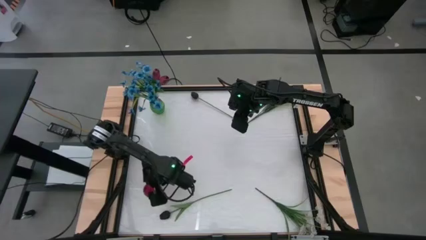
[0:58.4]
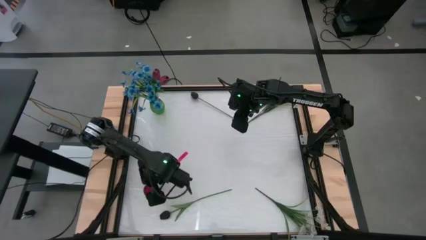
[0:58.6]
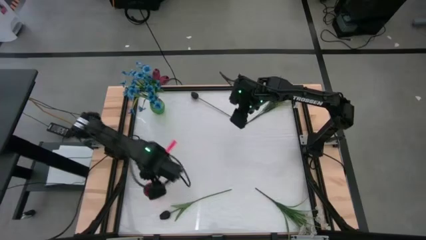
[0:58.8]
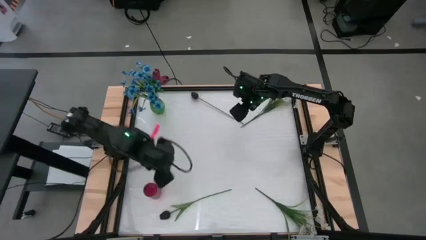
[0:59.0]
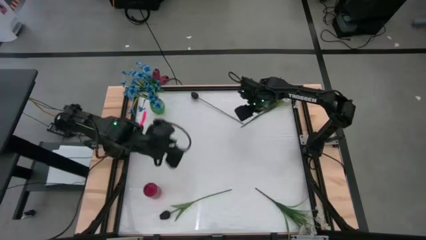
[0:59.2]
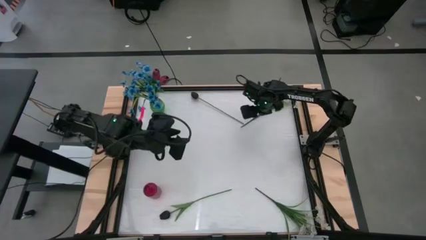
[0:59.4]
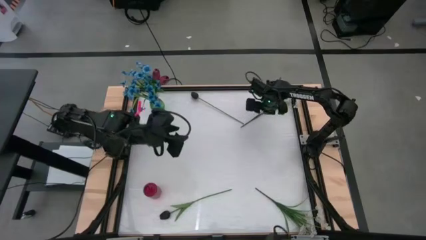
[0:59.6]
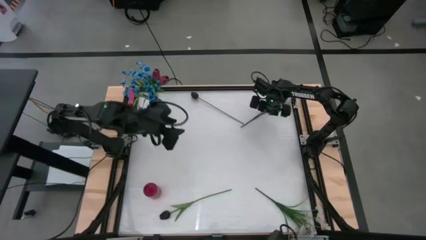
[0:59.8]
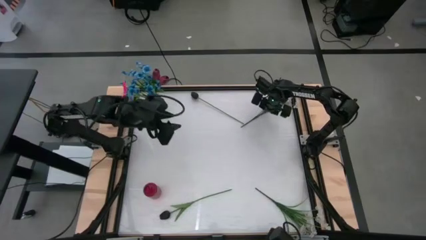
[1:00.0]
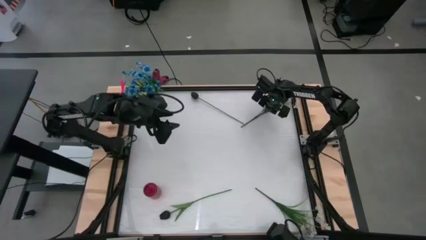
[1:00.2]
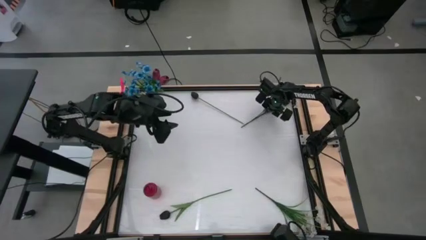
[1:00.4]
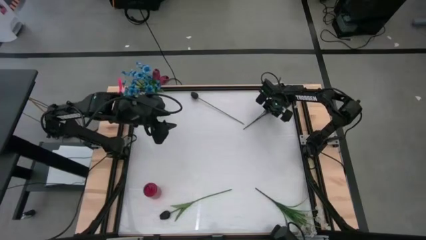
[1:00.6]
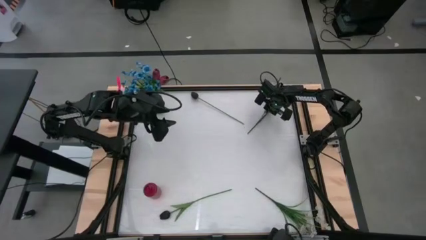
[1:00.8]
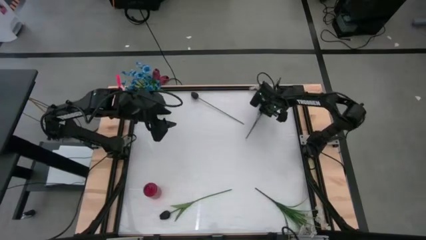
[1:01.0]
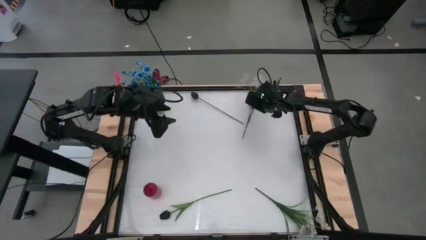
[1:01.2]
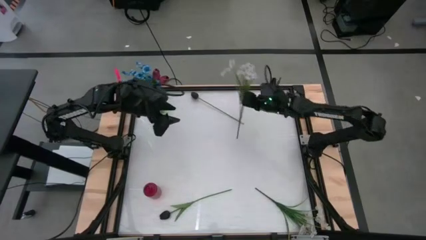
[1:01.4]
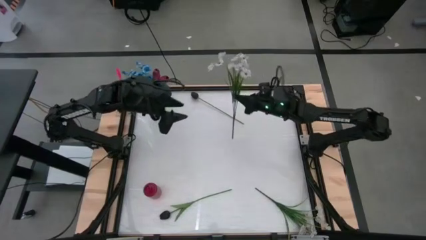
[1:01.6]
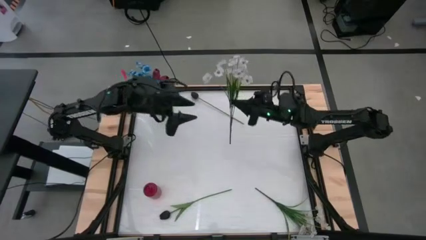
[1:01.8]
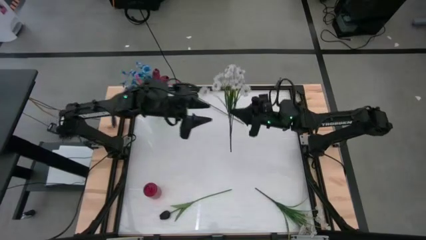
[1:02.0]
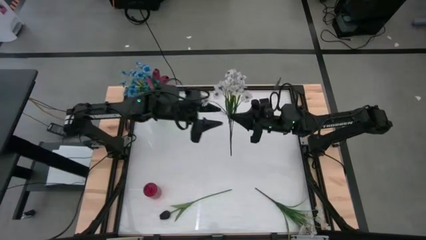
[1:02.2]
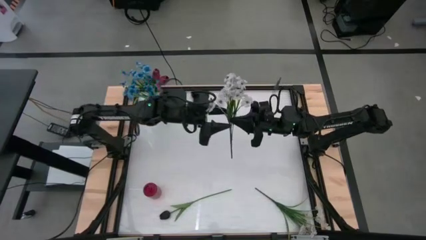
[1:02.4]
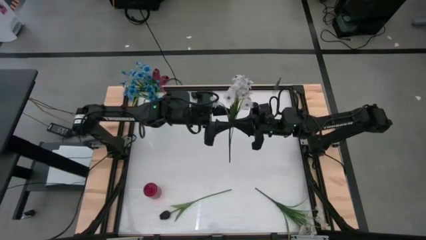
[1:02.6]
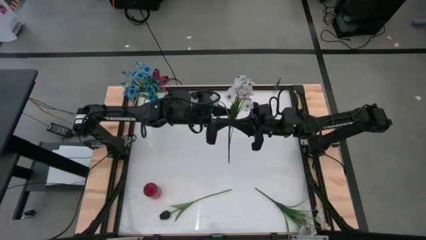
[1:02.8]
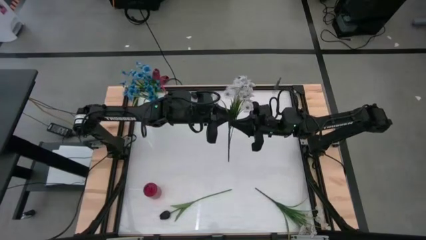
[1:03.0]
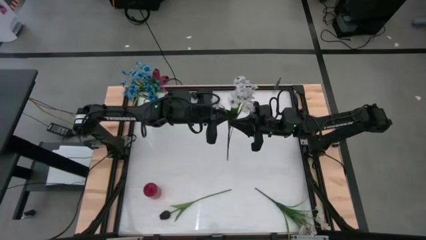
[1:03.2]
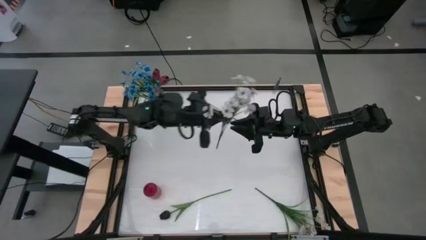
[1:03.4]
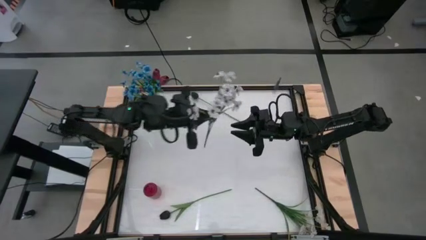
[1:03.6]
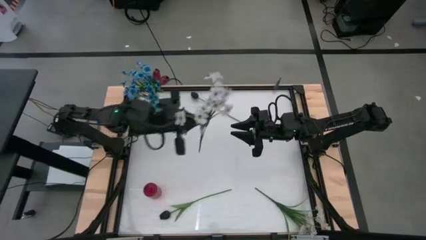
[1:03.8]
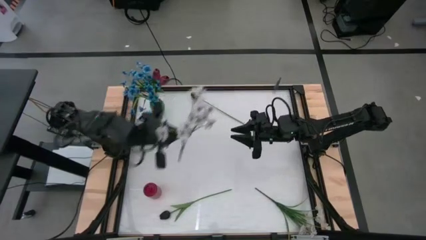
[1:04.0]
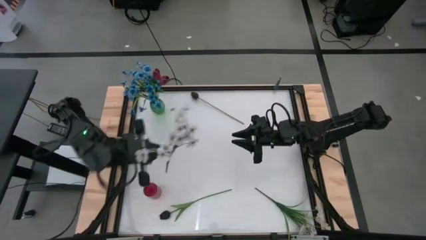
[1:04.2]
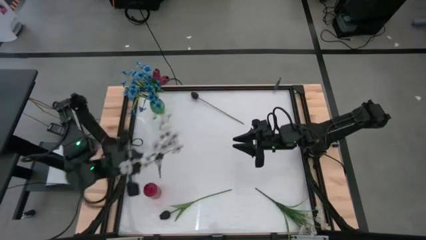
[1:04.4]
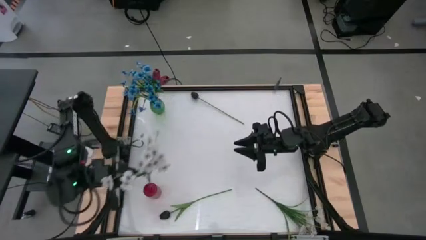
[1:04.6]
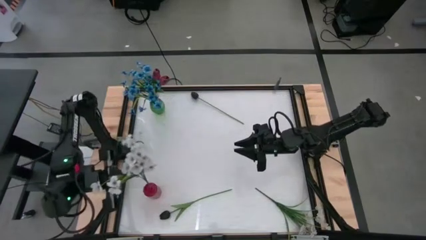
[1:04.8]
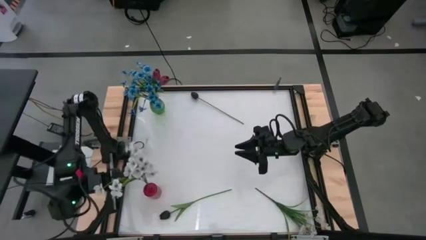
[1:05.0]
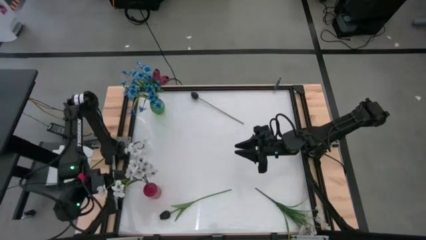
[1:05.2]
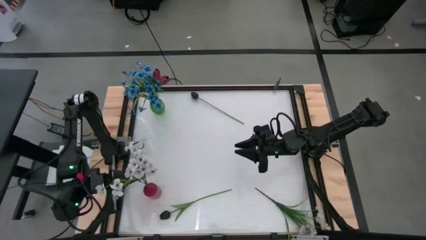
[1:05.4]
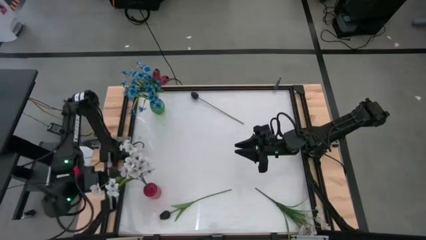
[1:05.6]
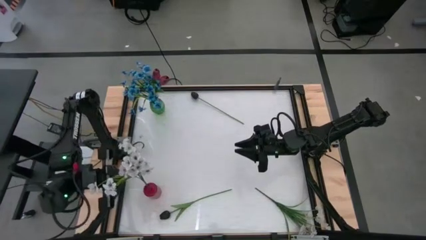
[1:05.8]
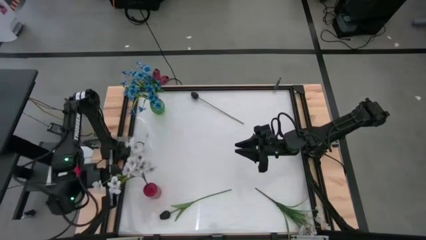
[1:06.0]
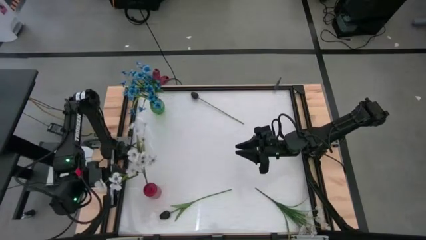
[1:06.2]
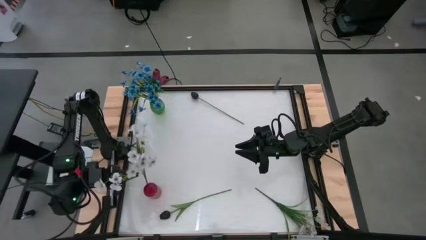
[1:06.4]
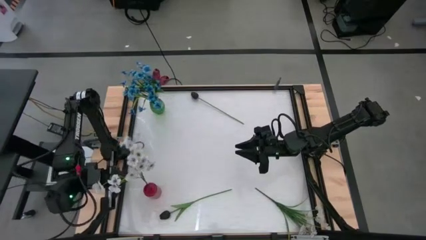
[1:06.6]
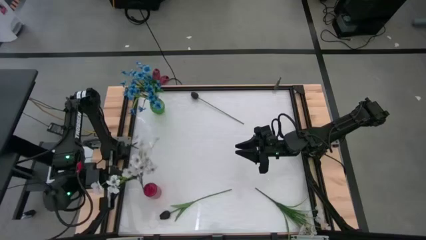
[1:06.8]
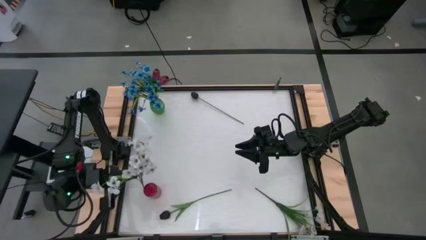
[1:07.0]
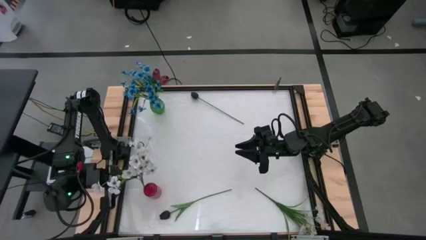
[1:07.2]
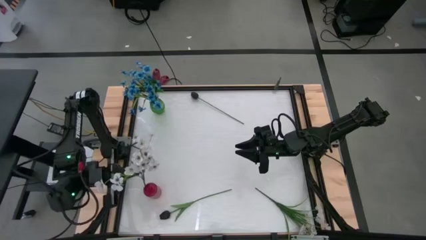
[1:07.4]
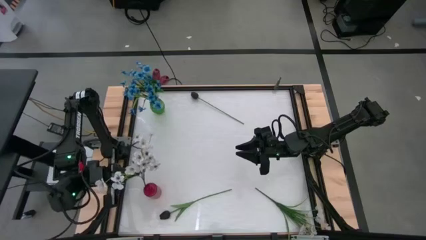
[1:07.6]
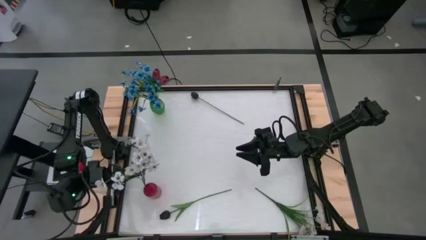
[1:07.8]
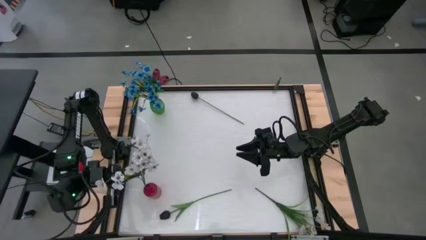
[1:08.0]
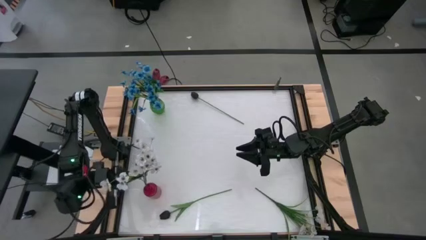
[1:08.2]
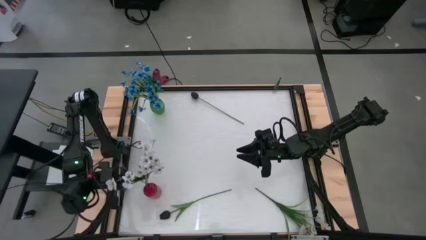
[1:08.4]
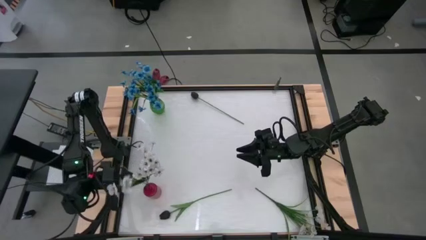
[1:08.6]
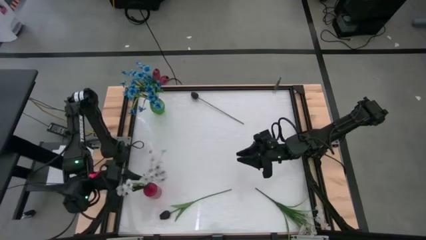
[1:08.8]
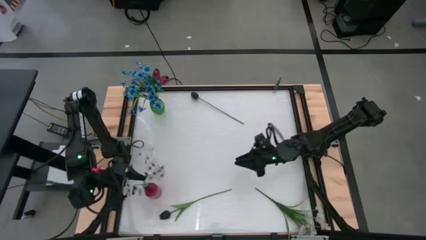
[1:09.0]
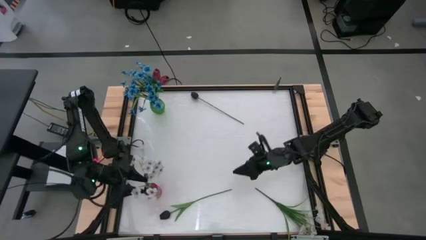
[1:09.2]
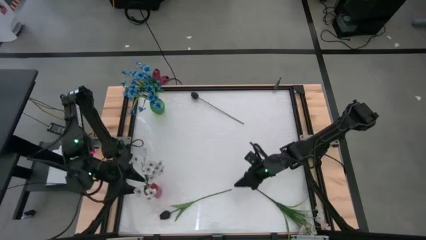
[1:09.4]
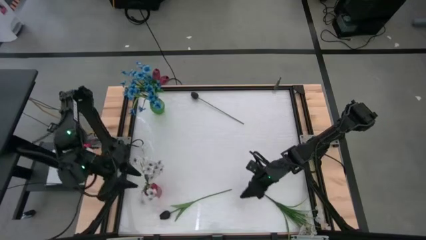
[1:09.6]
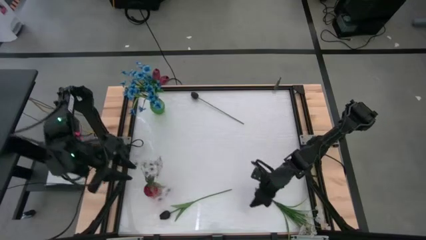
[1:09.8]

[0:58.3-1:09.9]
Task: Sort flowers into vase by color
Put the top white flowers into the red vase

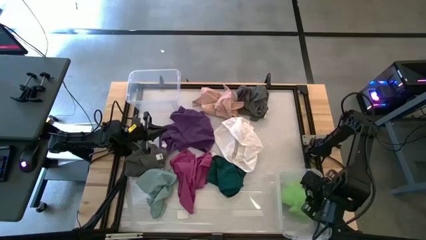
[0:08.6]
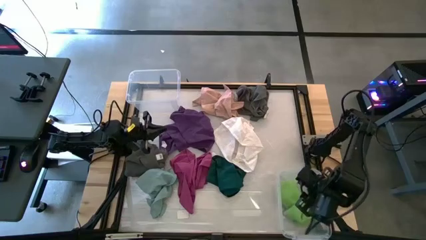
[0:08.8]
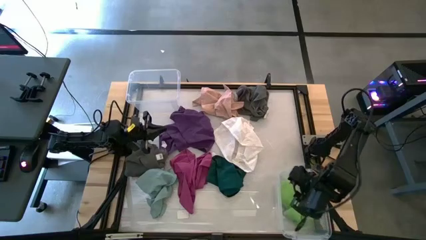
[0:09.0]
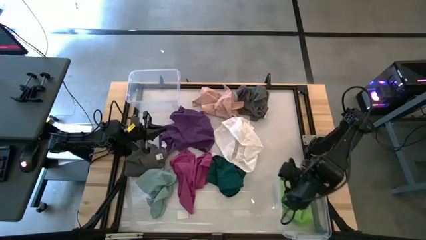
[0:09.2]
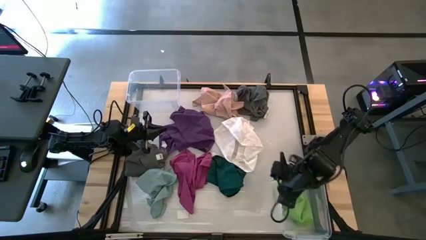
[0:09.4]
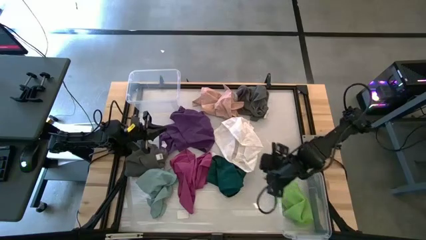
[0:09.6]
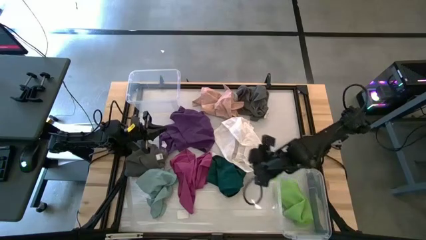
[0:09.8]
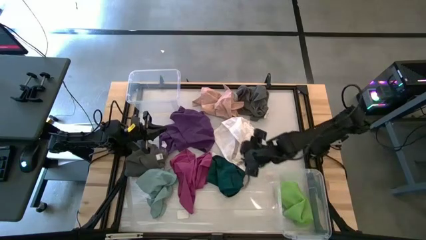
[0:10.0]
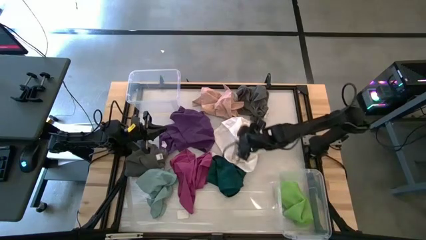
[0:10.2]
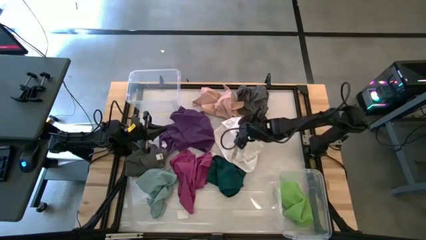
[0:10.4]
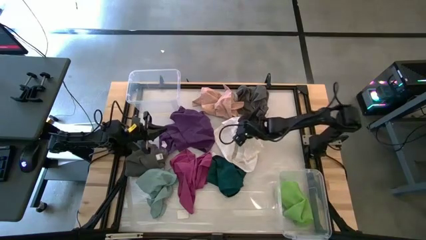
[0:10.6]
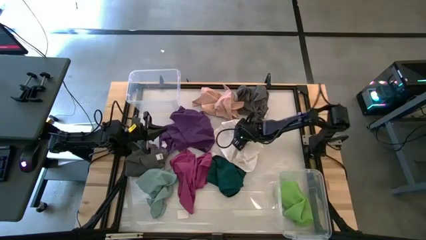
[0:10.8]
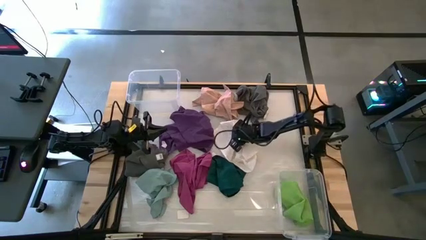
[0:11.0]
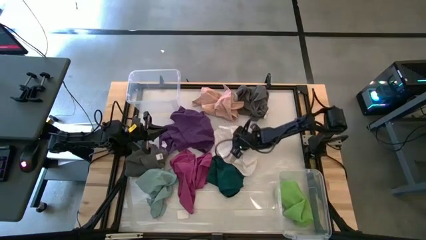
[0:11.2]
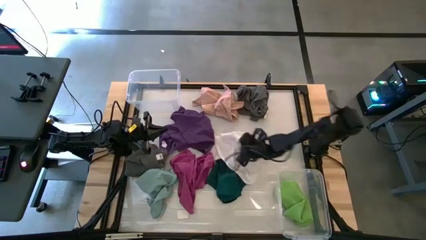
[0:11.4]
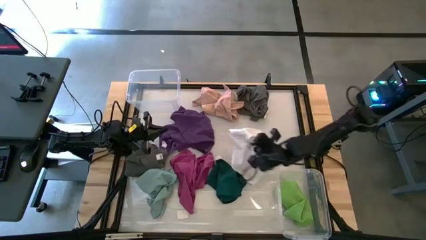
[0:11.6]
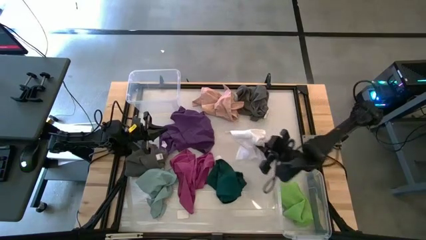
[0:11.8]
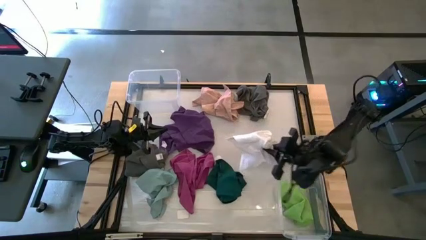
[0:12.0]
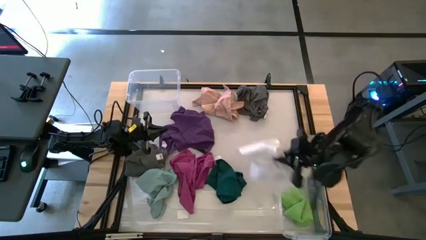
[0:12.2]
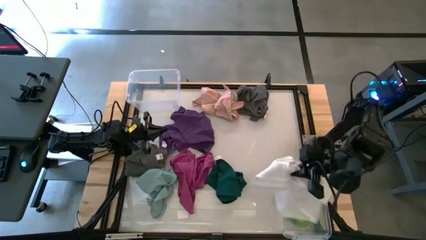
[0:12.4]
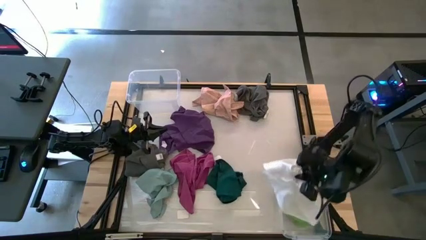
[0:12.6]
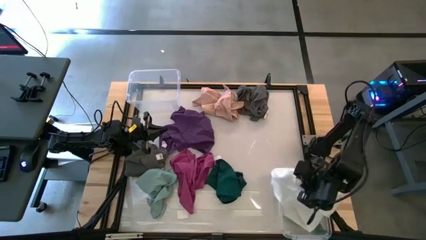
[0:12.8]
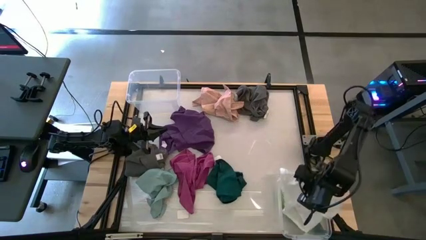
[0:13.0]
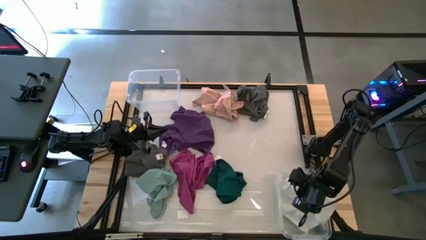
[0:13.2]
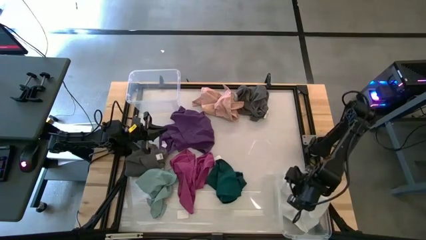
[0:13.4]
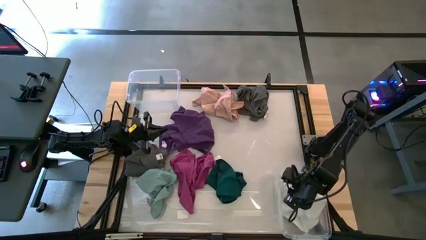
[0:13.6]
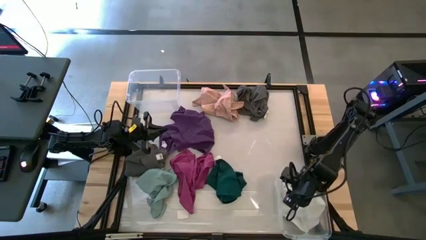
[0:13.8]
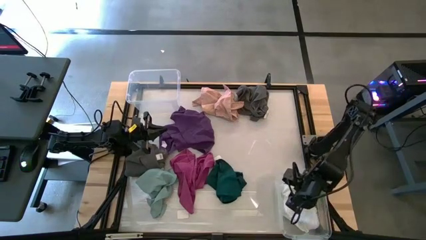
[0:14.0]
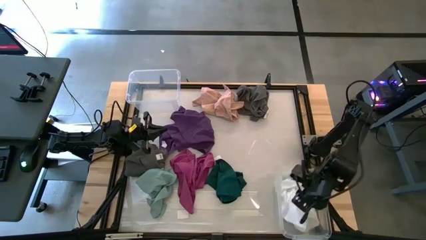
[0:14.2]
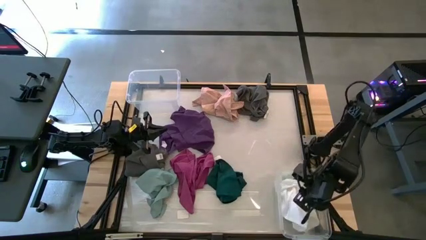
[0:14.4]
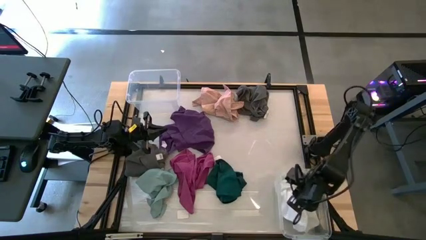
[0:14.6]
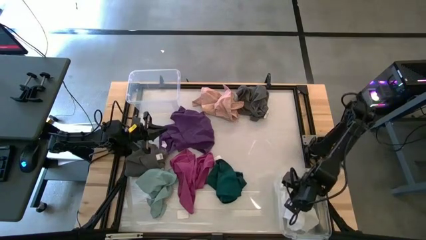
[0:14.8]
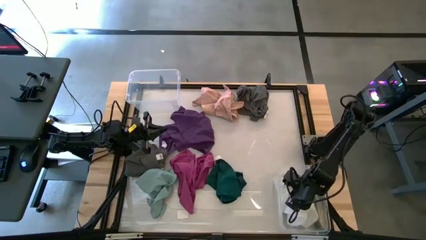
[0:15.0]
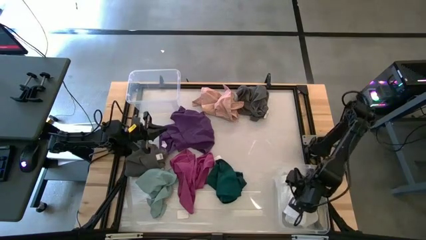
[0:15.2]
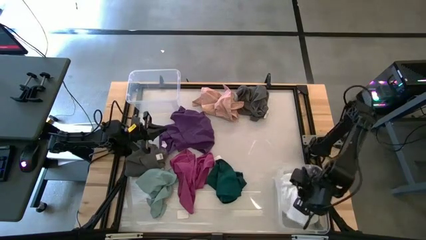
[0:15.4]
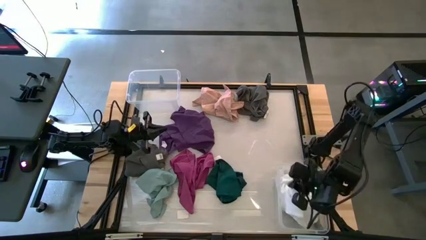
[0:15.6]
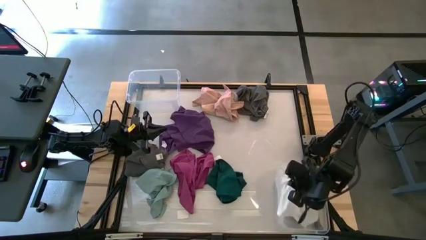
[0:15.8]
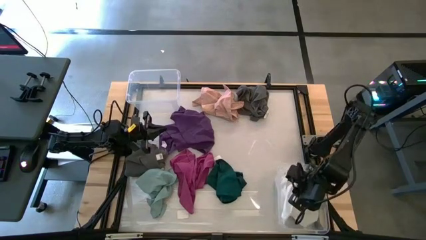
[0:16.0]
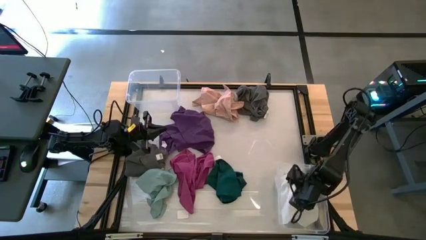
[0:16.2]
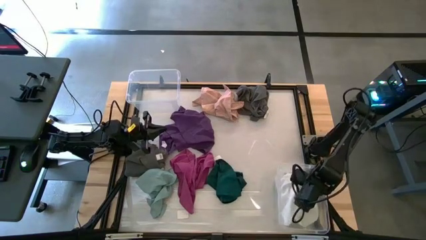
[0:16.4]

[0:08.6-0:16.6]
Task: Sort microfiber towel by color & place in baskets
Put the white towel into the bottom transparent bin
